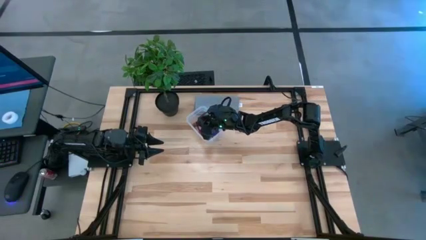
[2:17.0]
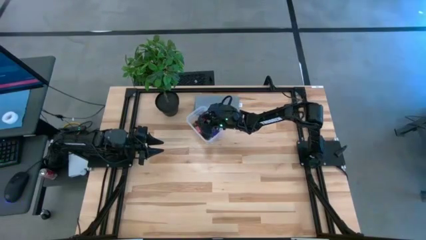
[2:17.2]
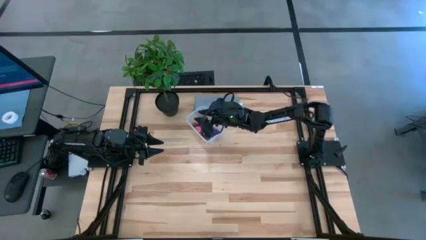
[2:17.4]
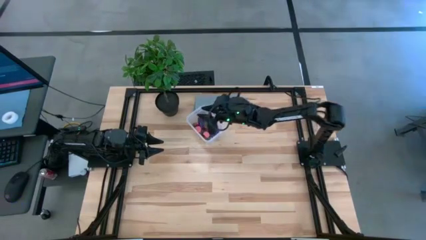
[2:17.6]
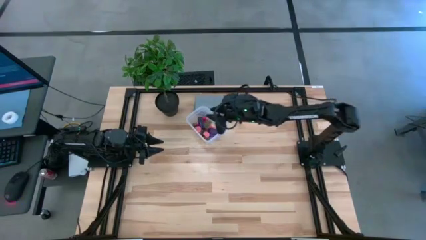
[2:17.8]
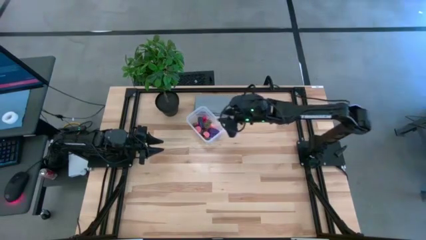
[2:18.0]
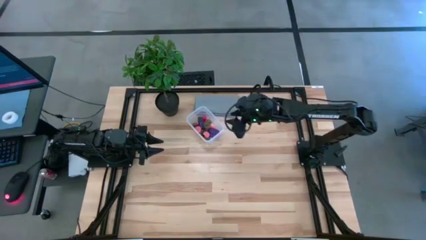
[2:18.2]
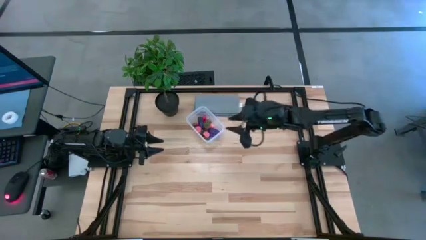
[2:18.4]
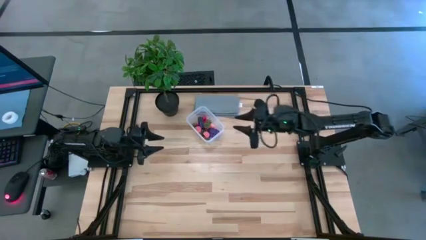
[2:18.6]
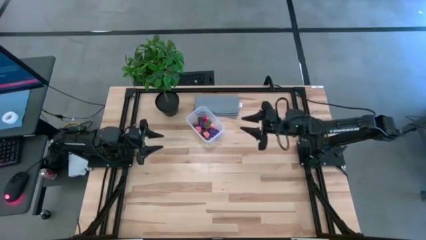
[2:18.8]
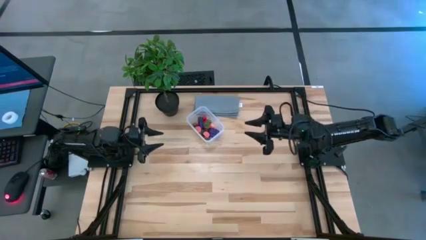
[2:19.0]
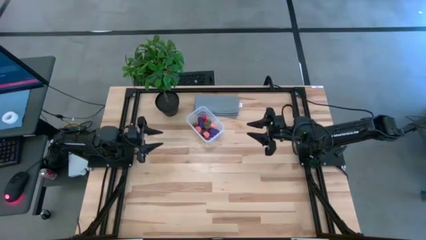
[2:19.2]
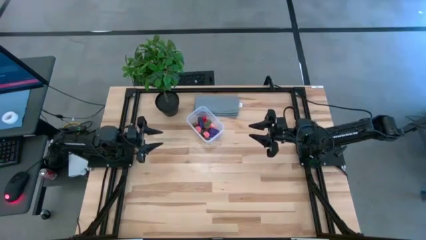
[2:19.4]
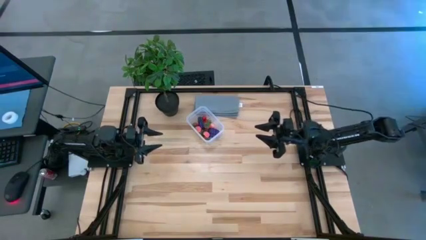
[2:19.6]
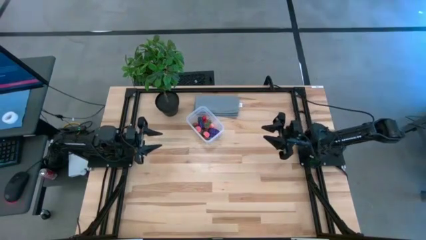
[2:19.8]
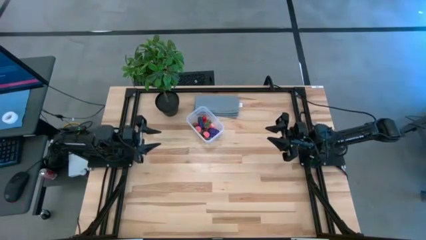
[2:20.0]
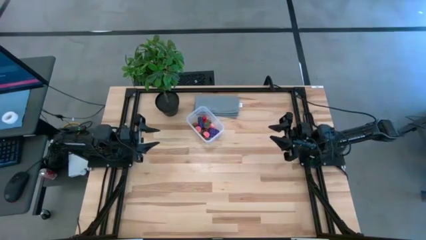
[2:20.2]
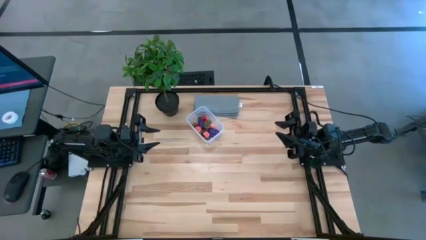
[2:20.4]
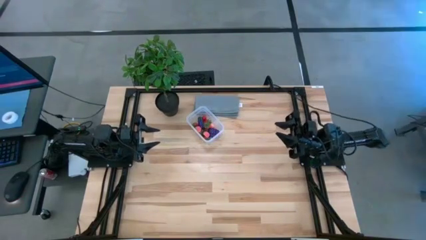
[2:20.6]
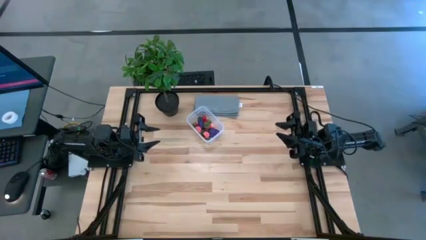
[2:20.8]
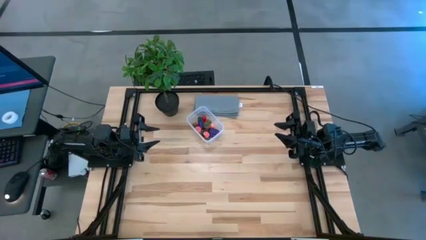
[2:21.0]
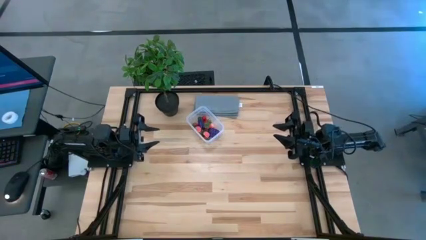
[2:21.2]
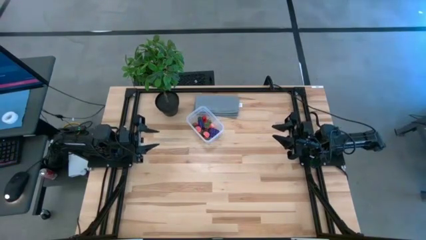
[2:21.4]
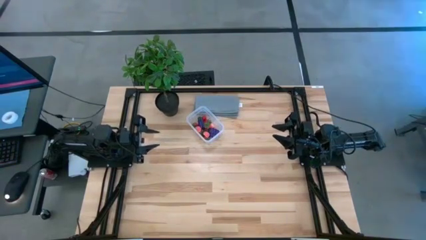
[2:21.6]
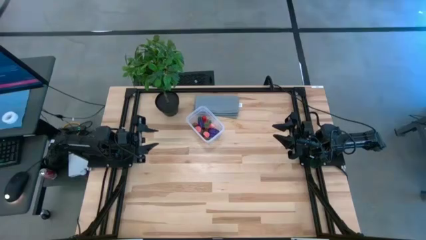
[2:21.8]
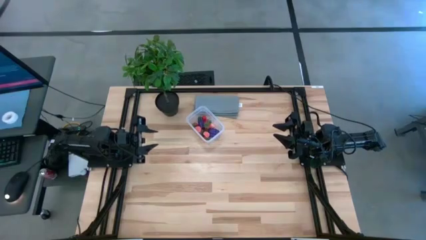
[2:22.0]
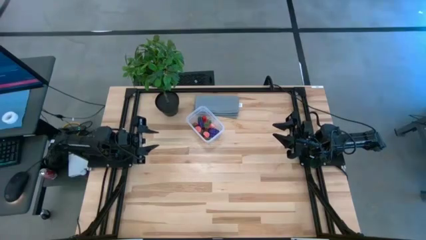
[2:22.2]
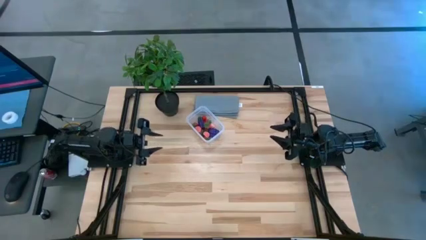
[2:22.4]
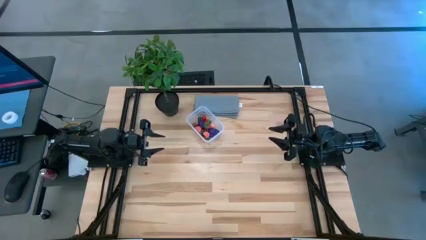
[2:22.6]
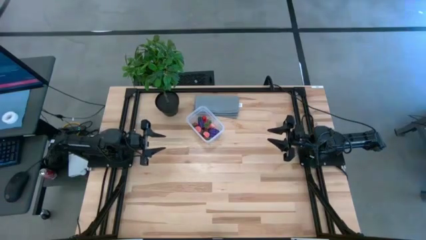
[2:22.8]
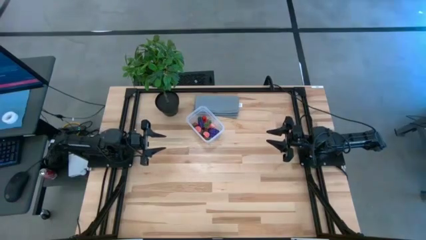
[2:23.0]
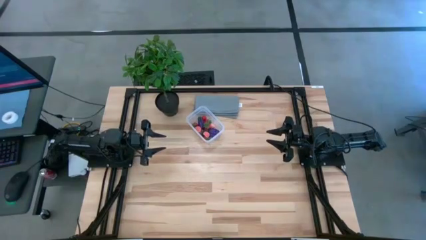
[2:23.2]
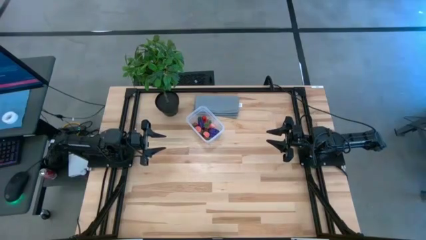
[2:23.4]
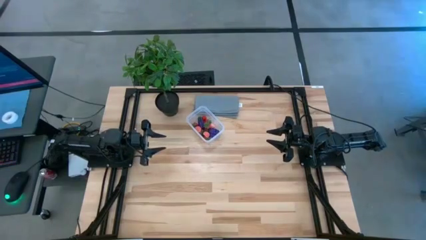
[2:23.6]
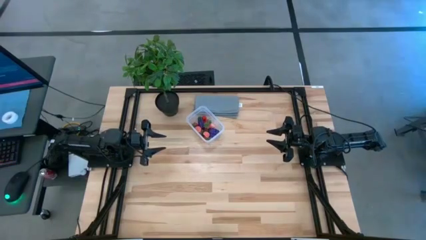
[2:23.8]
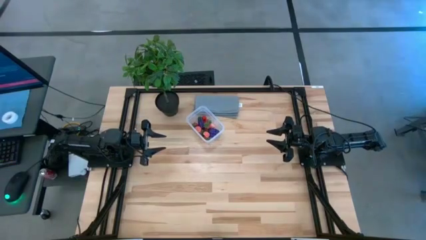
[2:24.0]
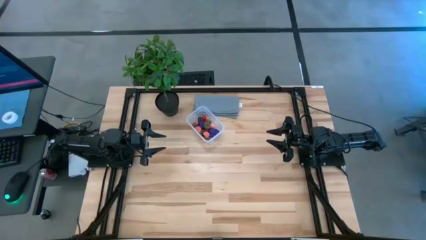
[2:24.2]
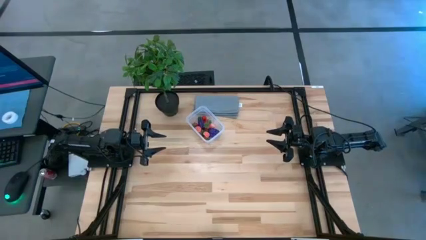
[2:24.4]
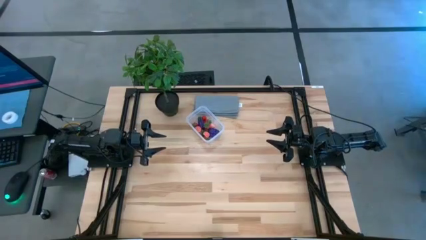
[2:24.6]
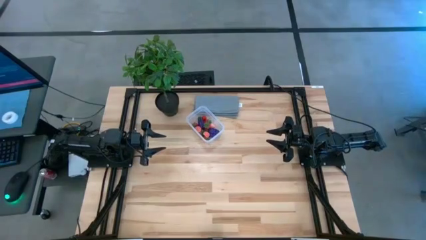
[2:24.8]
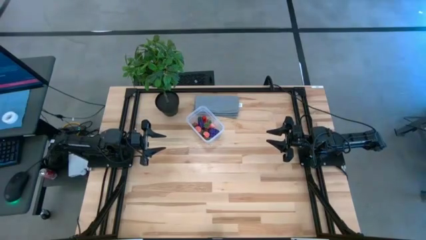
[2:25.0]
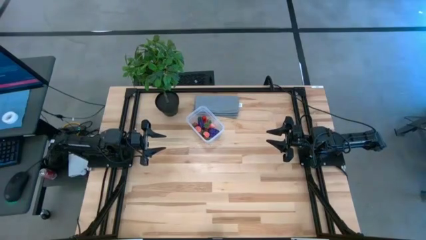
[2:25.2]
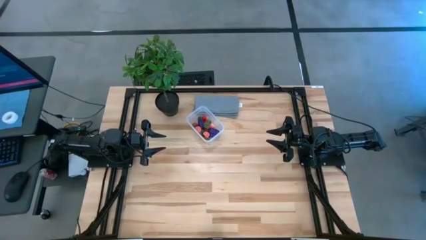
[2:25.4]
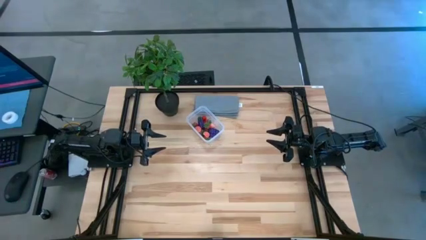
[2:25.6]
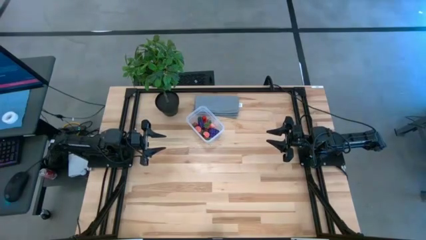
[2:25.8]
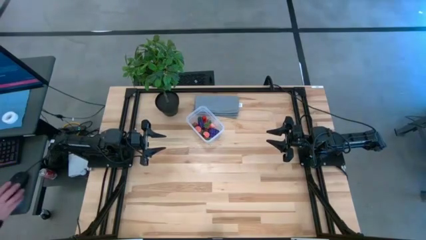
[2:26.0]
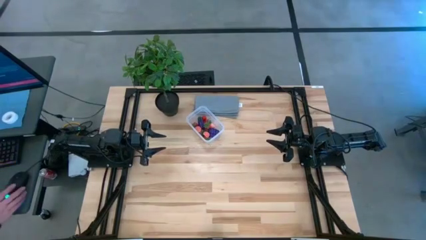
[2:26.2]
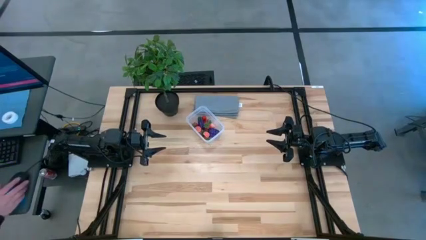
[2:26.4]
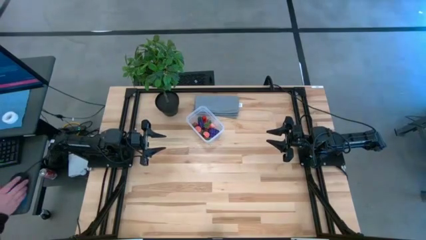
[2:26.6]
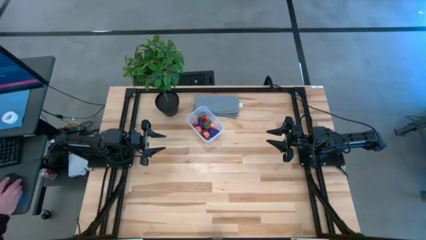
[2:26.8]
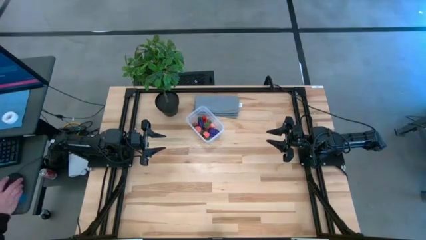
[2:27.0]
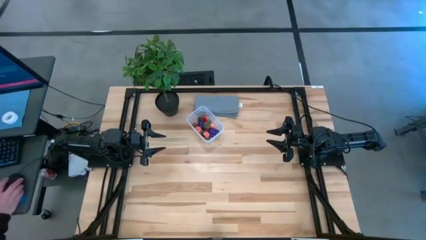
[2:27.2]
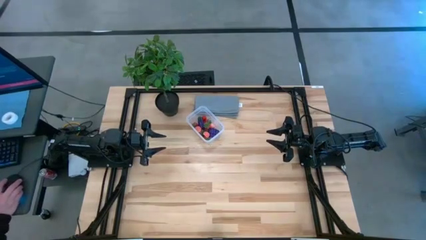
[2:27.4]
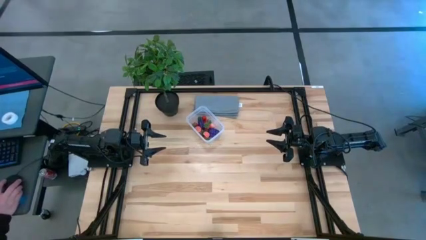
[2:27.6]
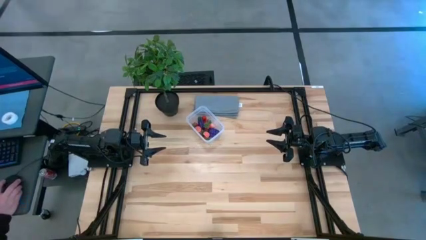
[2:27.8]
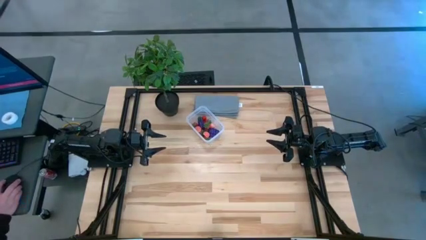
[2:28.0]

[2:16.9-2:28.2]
Task: Pick and placing Produce into tupperware
Return to Home Position
